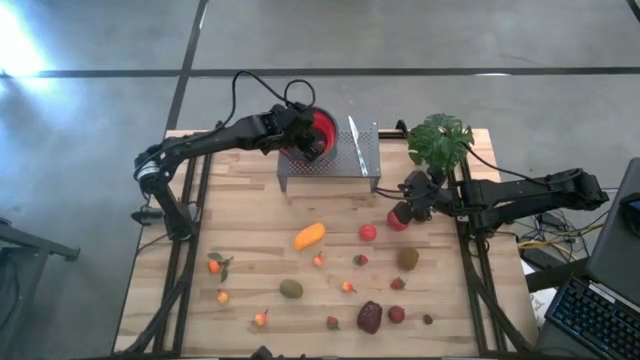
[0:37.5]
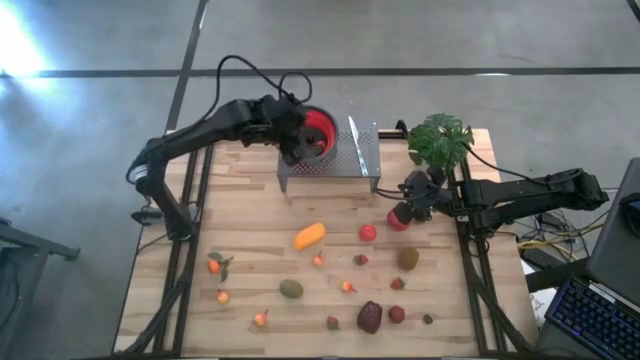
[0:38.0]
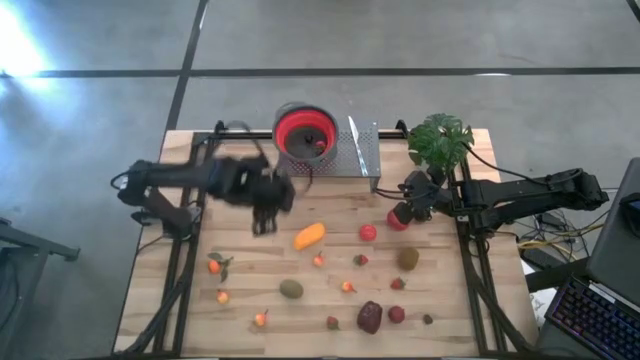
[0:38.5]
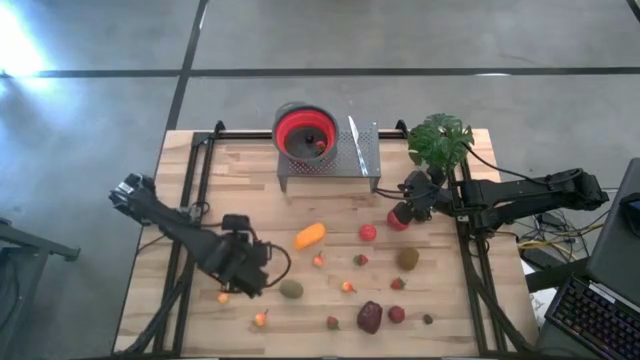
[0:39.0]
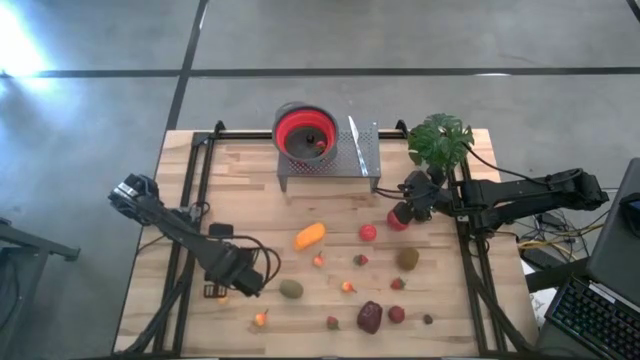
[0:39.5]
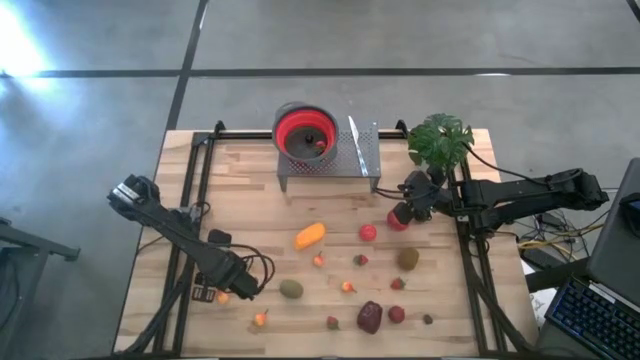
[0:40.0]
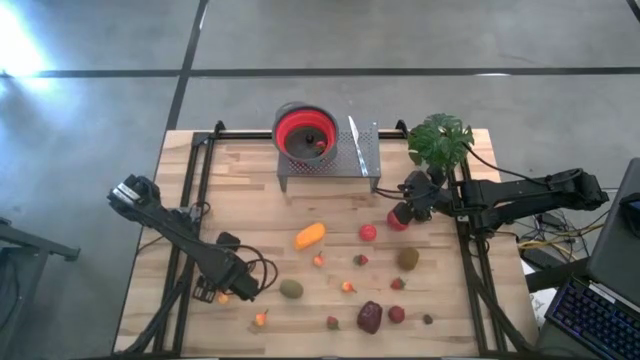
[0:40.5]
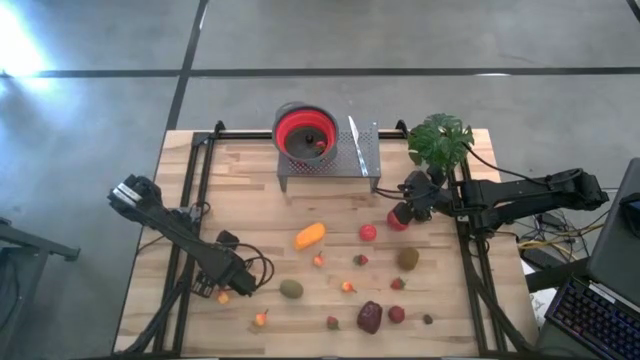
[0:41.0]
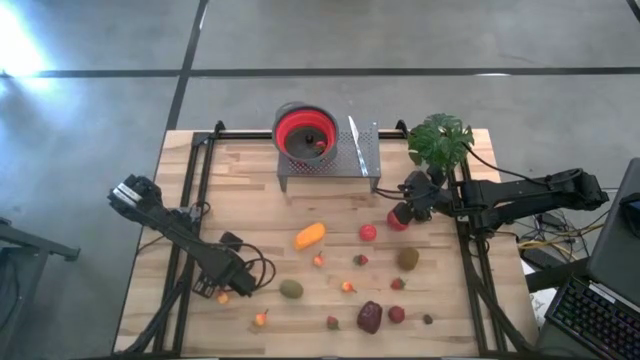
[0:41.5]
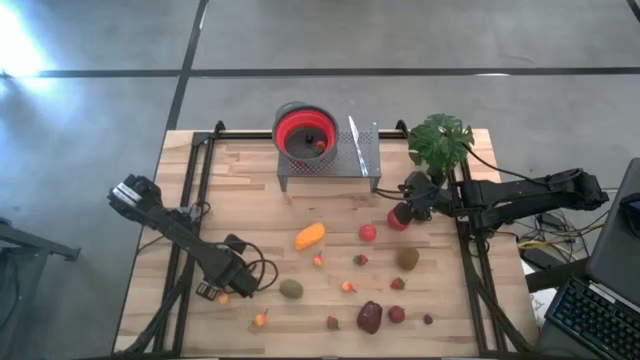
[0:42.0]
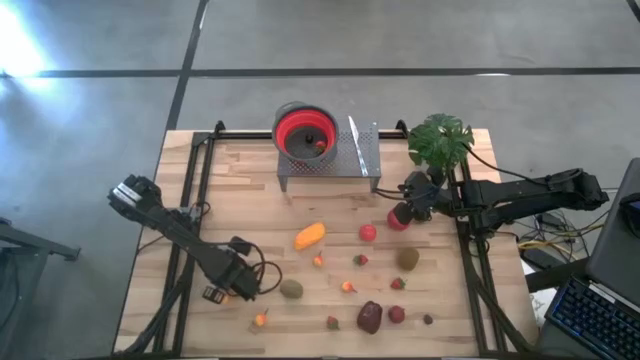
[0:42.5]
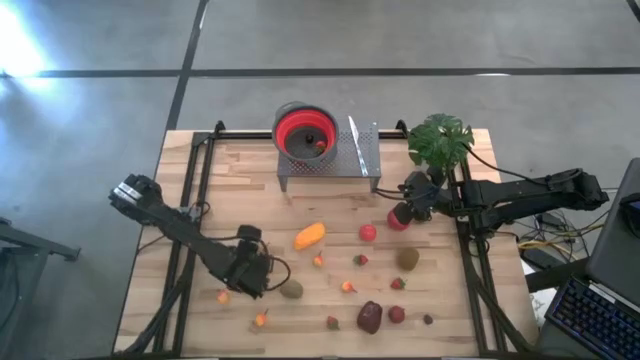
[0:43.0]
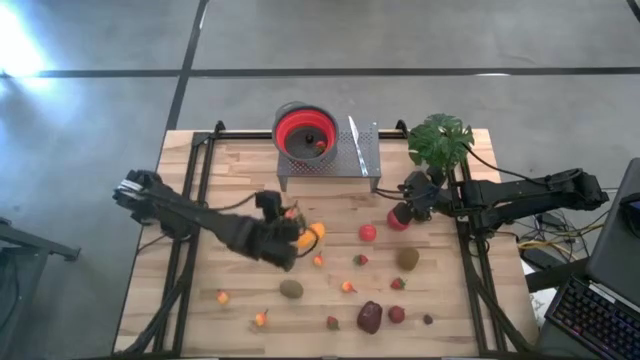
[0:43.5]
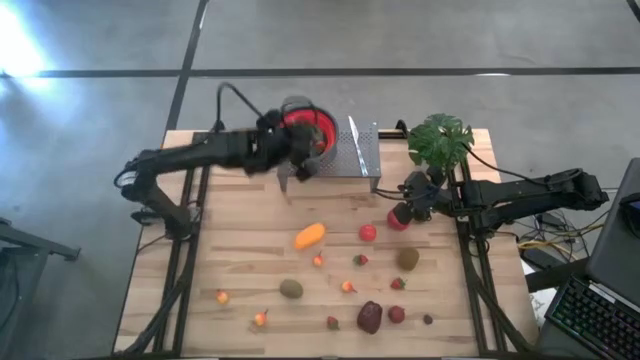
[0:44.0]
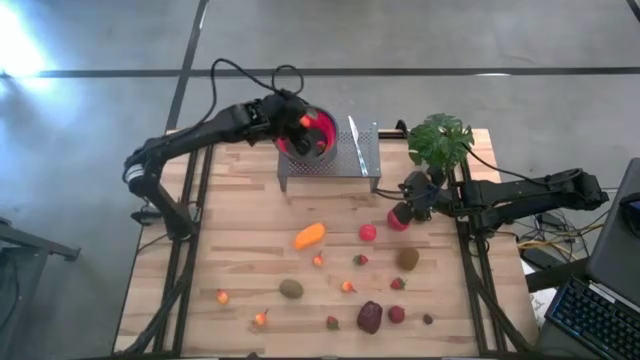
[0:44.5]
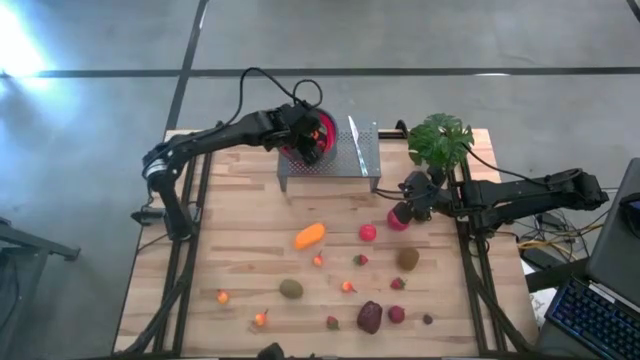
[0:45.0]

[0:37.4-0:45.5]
Task: Pick & Place Fruit
Put the orange into the red strainer bowl on the shelf

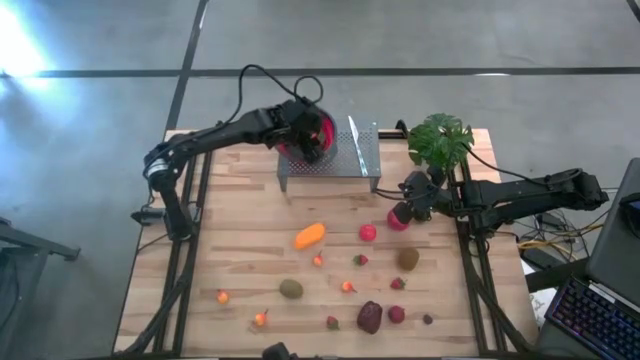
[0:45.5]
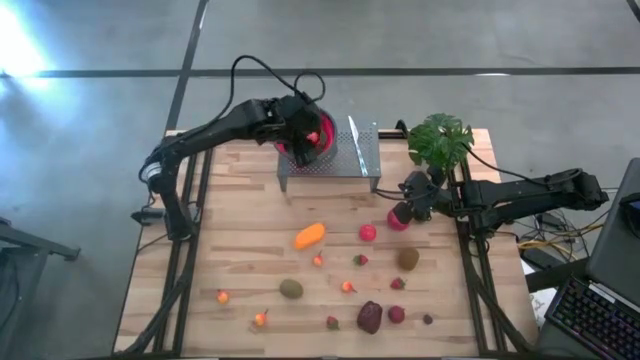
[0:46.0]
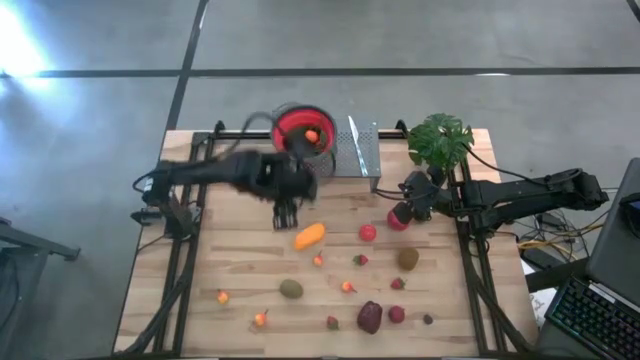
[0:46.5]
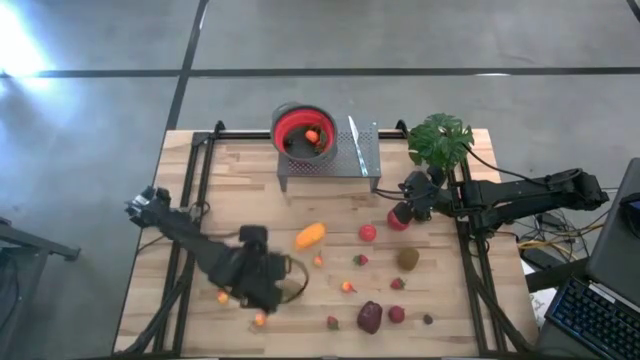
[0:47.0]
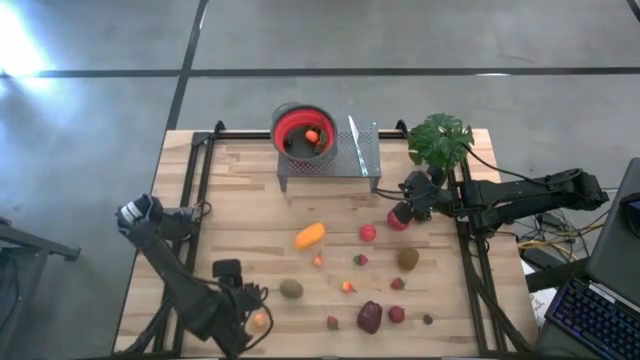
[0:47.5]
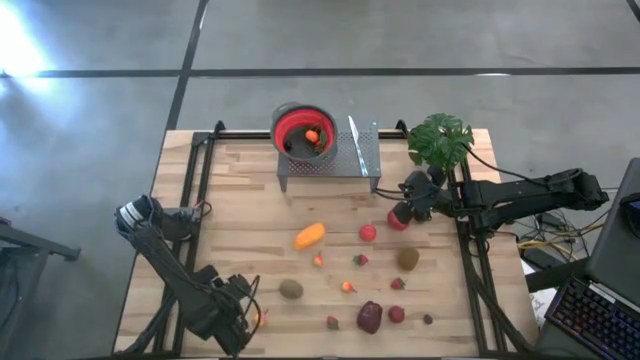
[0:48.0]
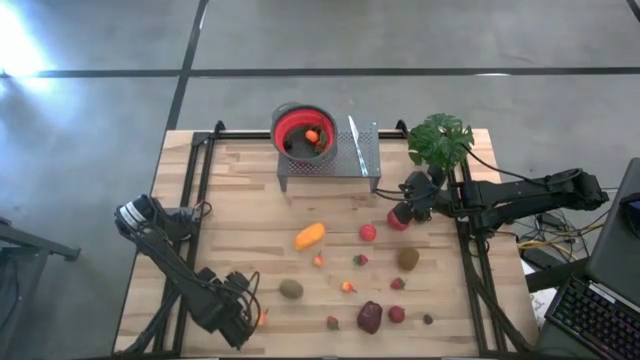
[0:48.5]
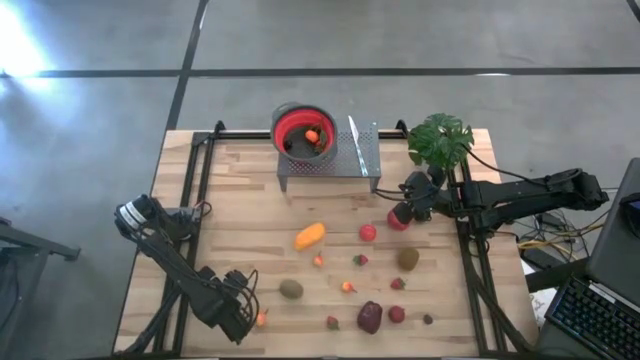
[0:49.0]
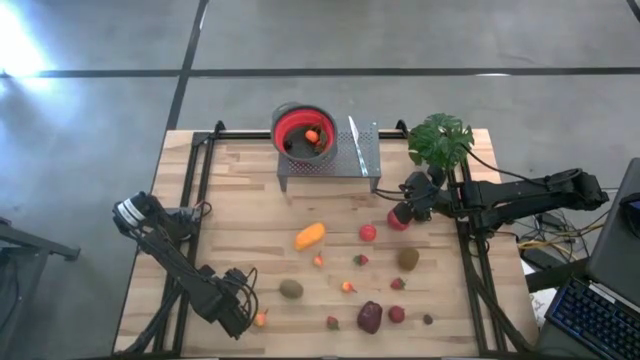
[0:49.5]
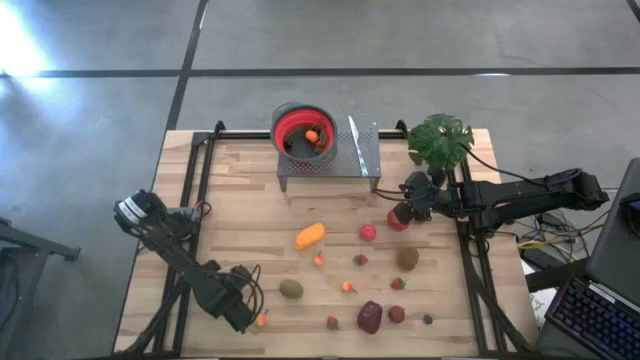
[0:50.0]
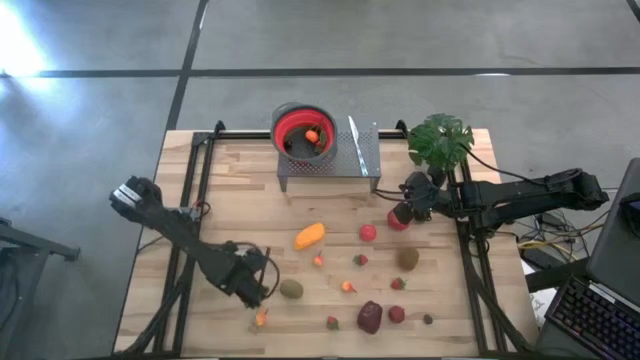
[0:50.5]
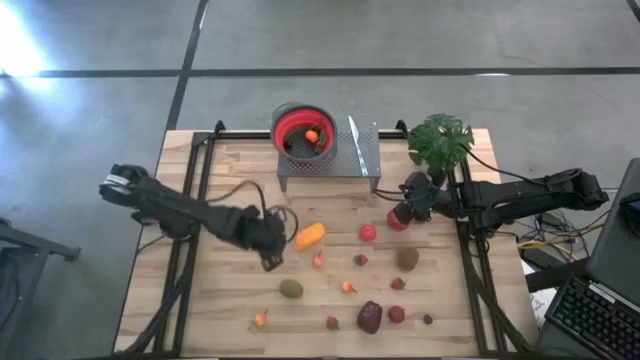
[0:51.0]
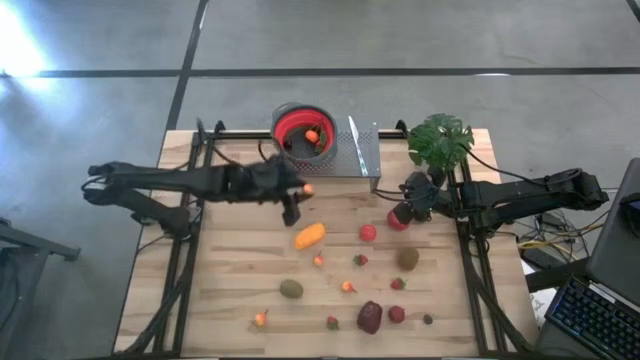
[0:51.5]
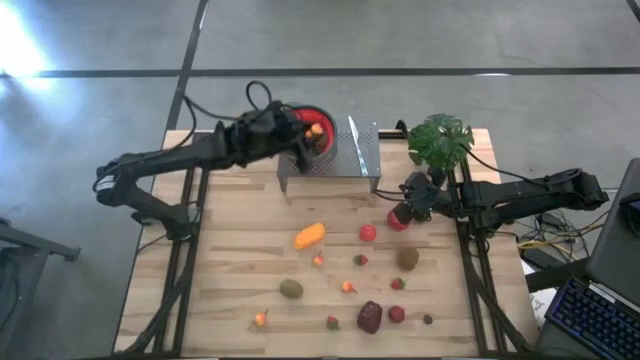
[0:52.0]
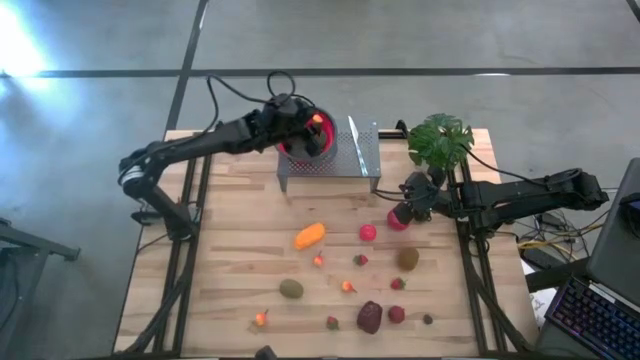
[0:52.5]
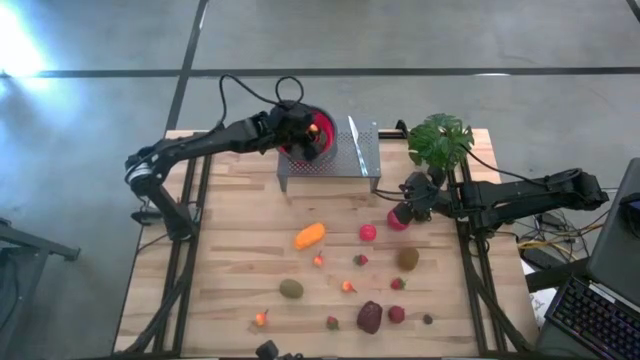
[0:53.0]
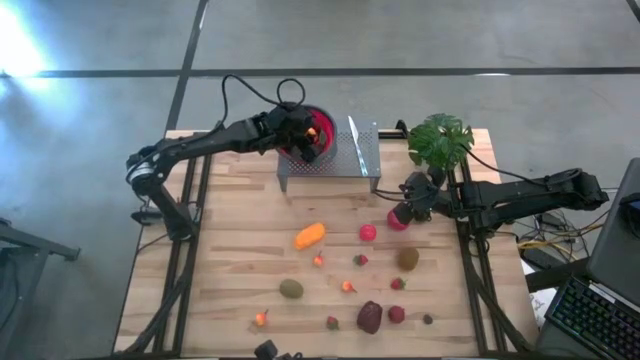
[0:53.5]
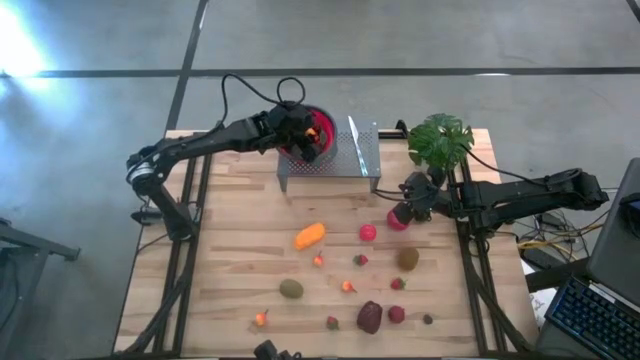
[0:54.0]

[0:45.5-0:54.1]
Put the middle left yellow pear into the red strainer bowl on the shelf

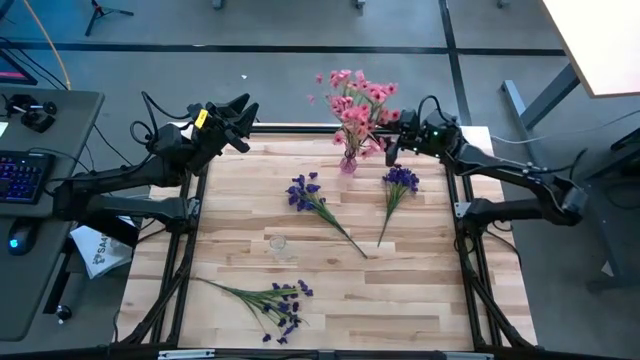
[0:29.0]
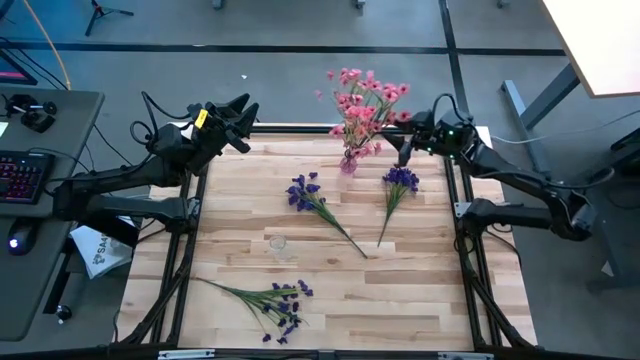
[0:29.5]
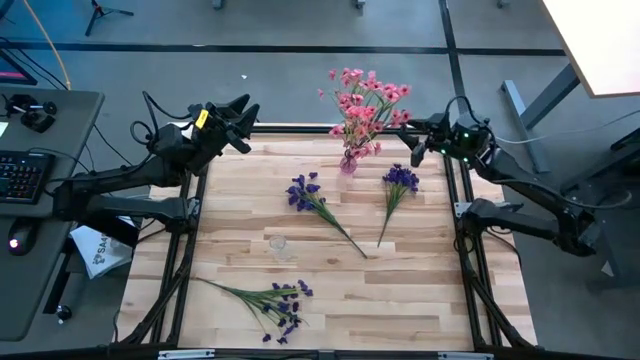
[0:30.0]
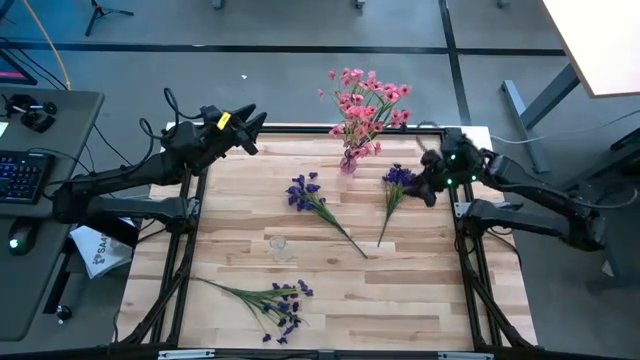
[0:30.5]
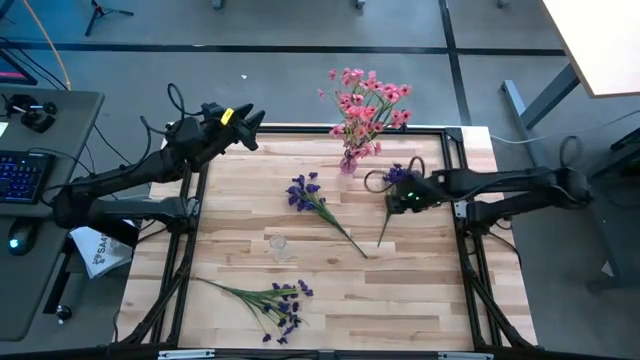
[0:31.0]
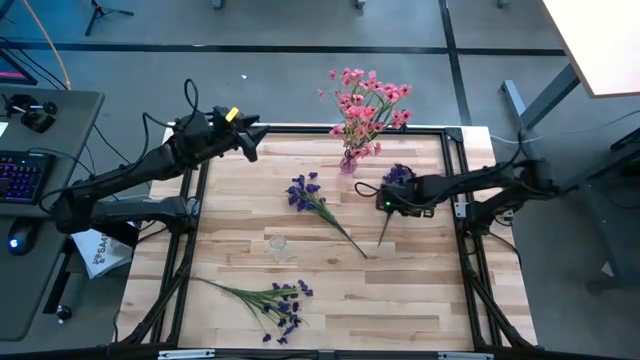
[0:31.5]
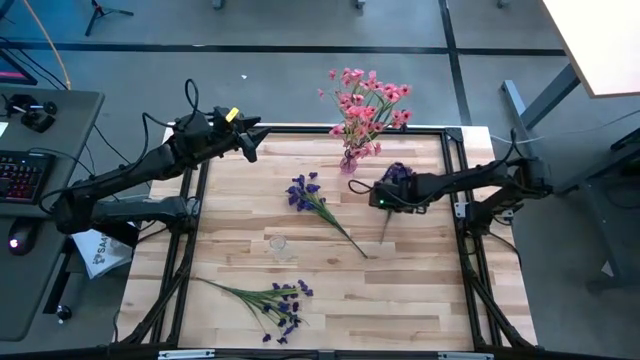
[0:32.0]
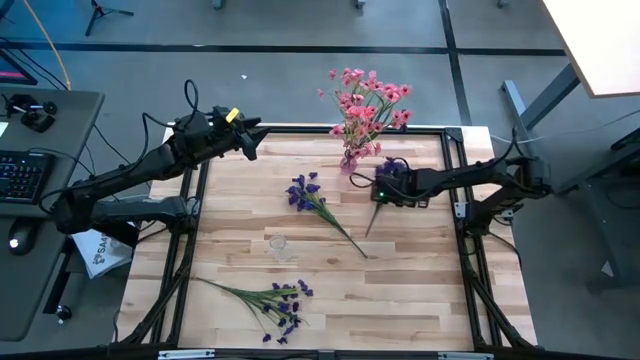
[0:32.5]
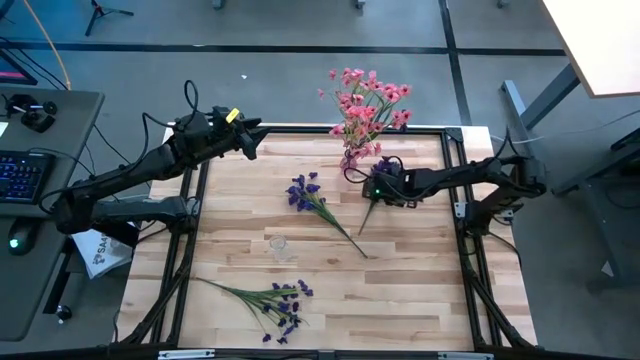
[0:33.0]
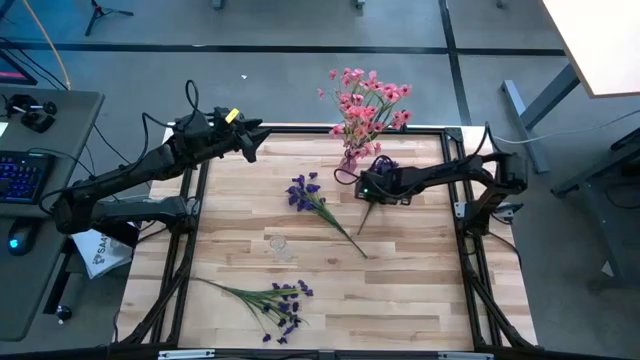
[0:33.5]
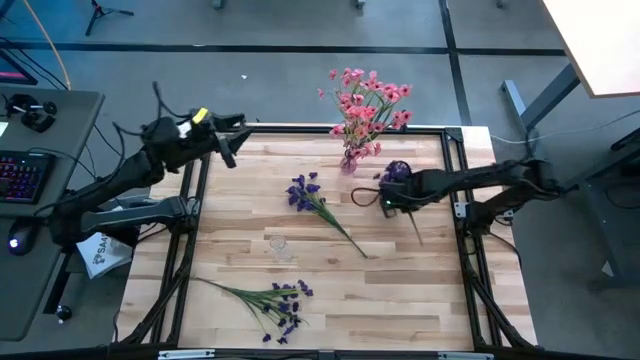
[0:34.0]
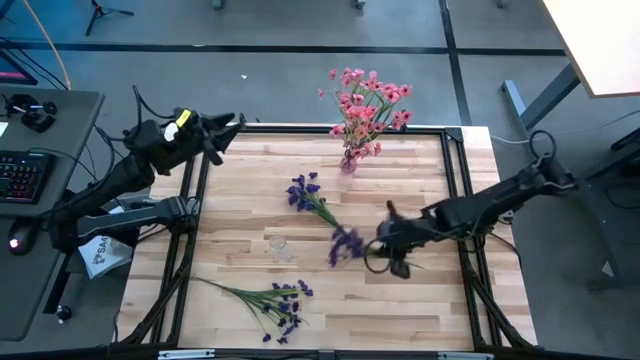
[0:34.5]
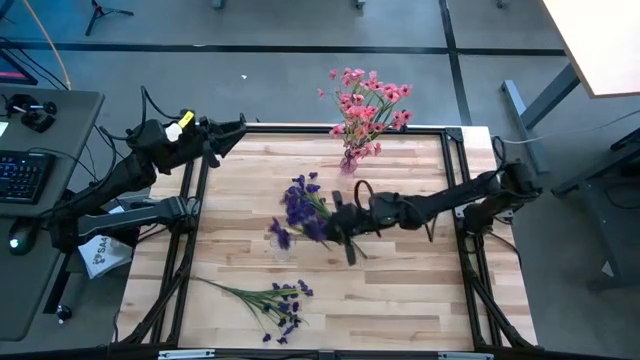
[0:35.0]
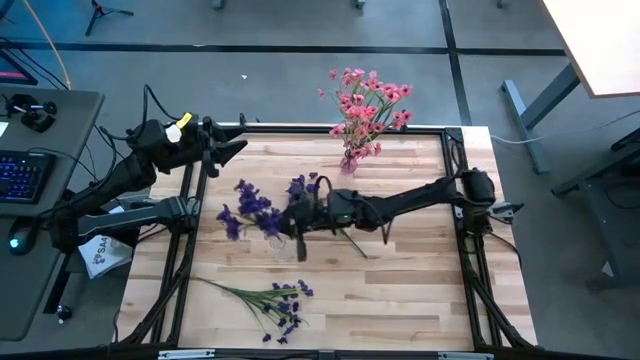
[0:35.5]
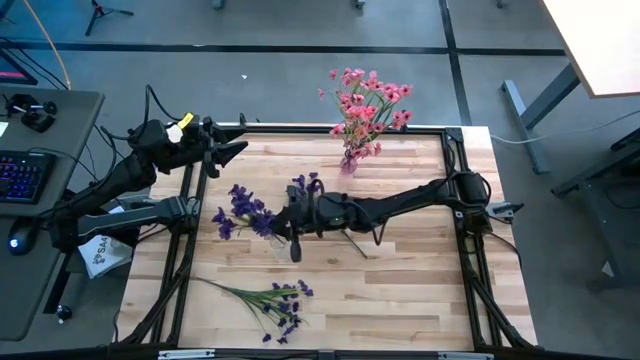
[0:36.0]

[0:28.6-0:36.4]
Task: Sort flowers into vase by color
Put the right purple flowers into the transparent vase
